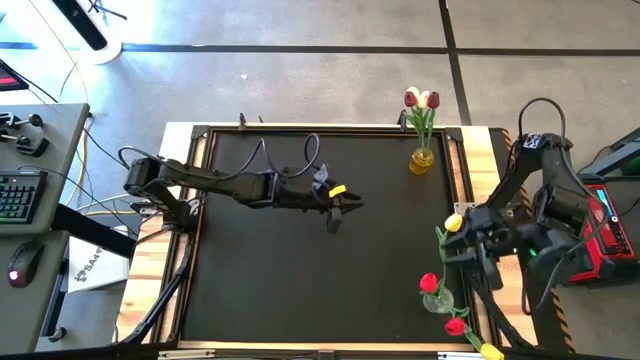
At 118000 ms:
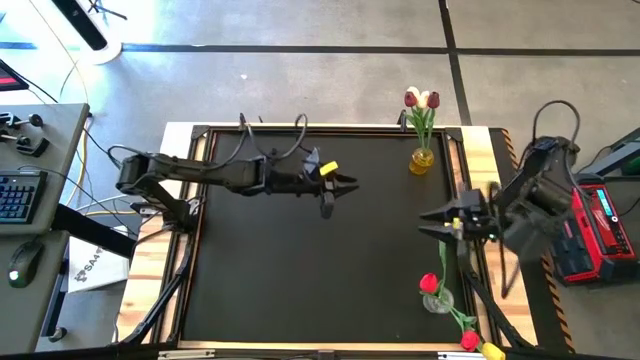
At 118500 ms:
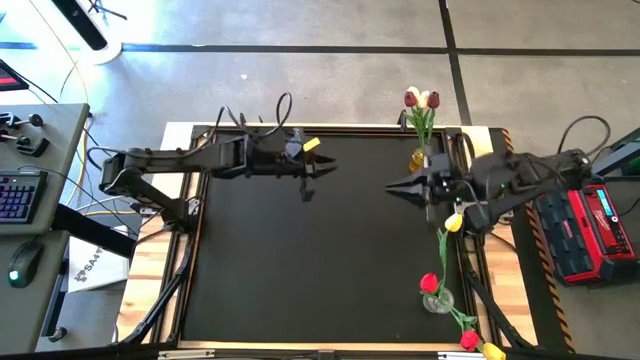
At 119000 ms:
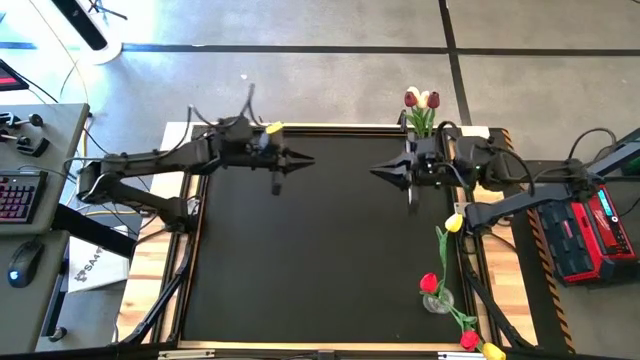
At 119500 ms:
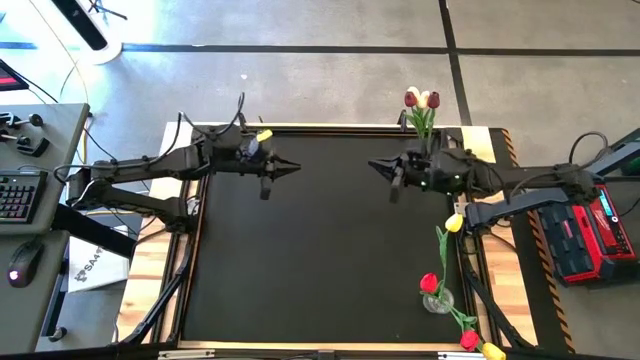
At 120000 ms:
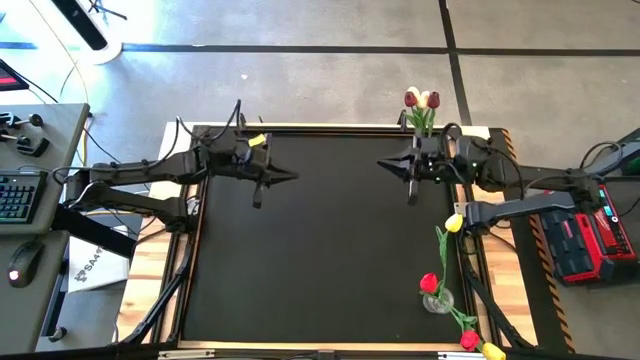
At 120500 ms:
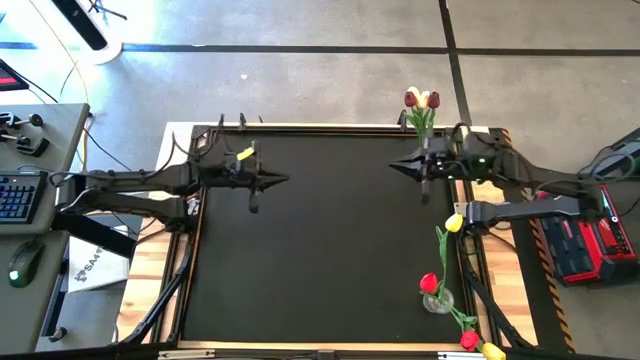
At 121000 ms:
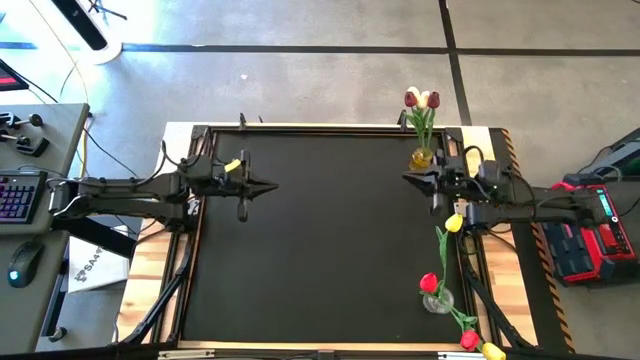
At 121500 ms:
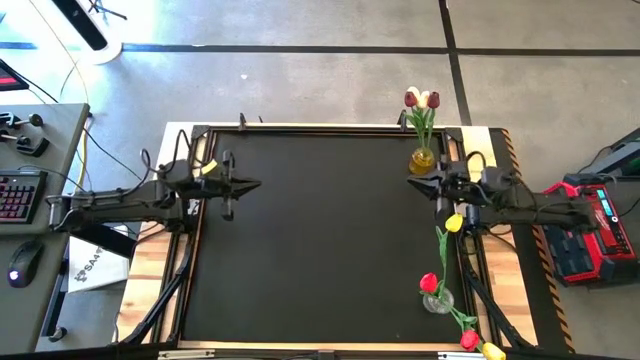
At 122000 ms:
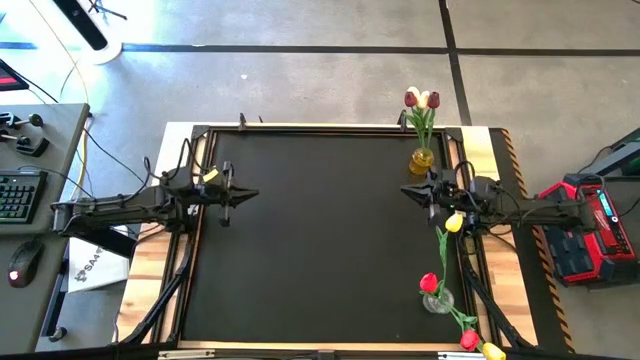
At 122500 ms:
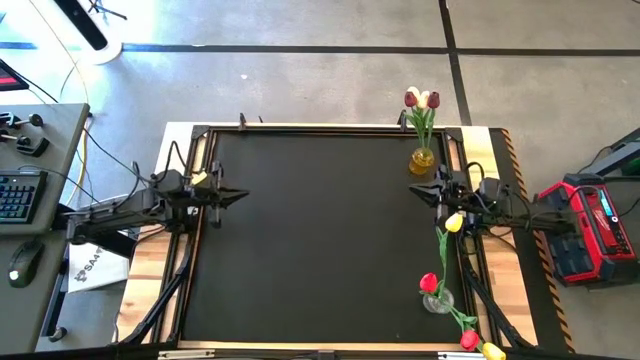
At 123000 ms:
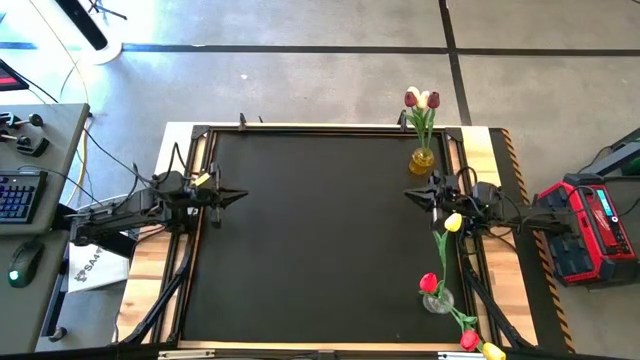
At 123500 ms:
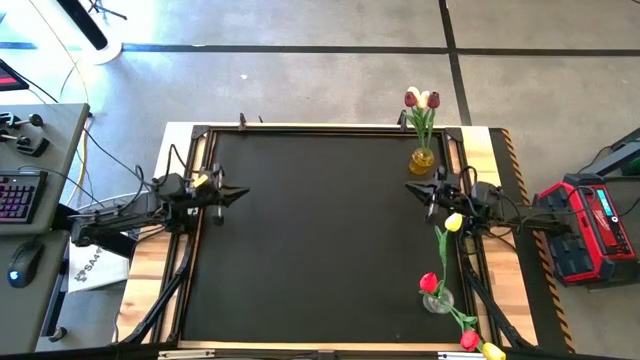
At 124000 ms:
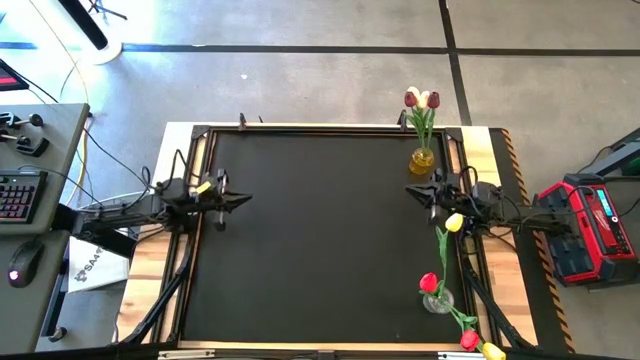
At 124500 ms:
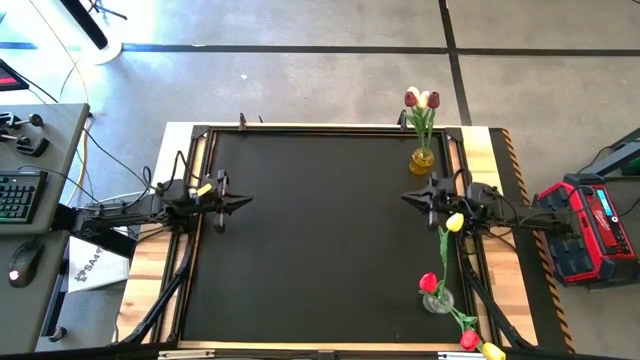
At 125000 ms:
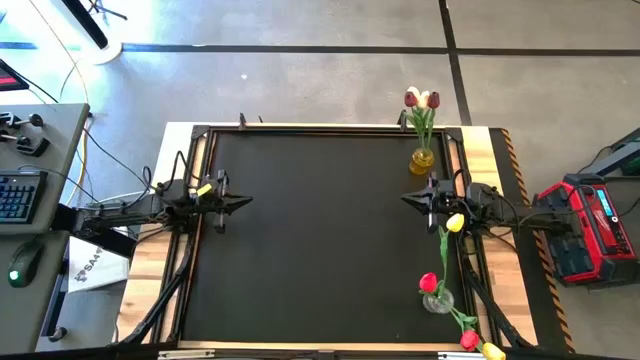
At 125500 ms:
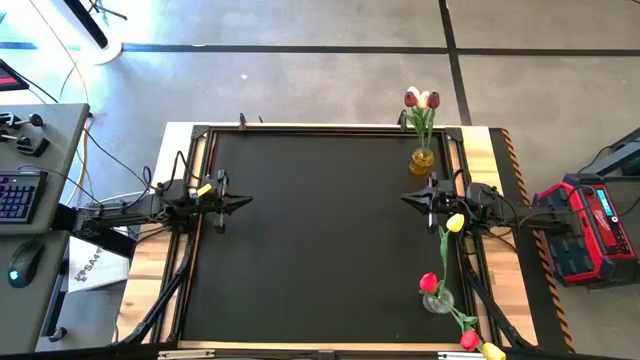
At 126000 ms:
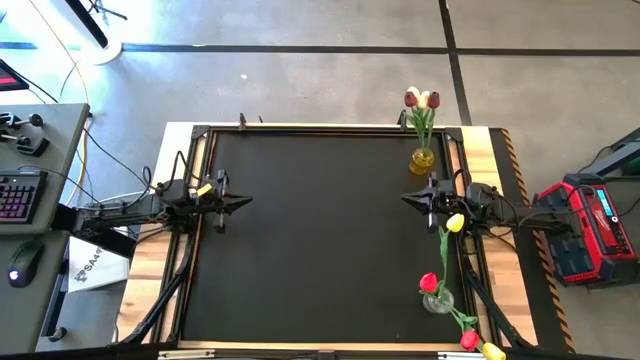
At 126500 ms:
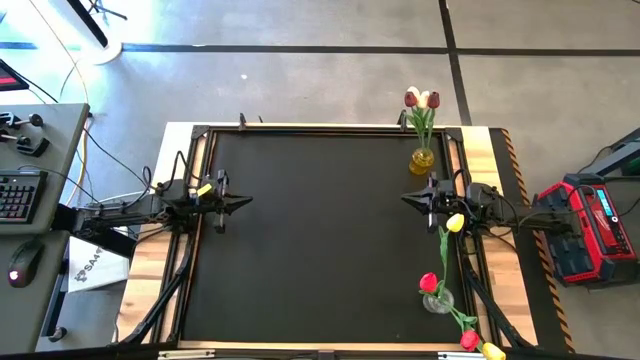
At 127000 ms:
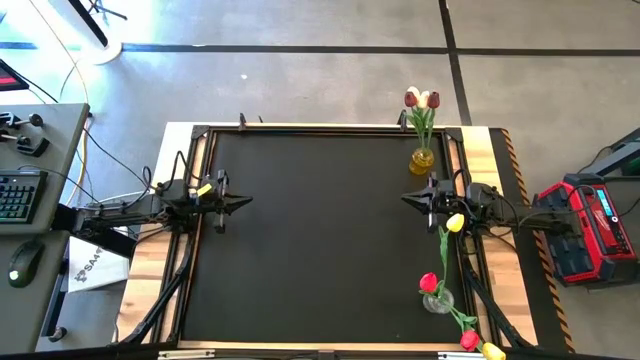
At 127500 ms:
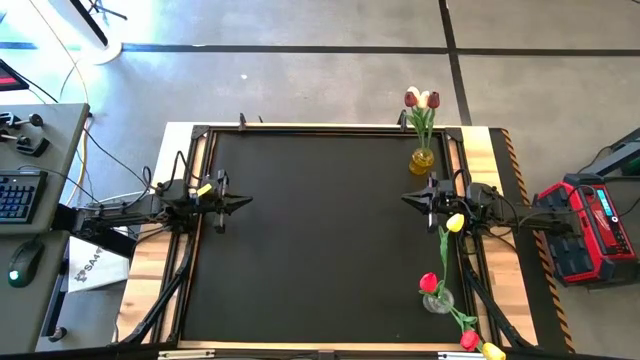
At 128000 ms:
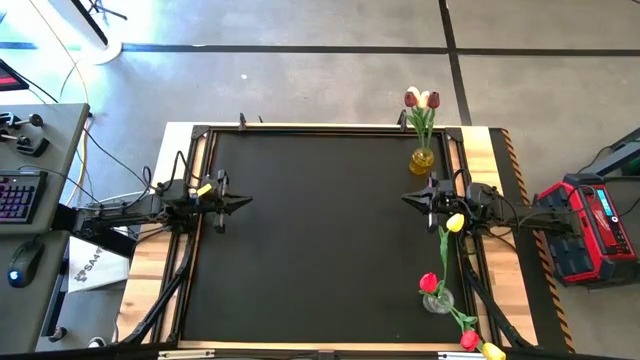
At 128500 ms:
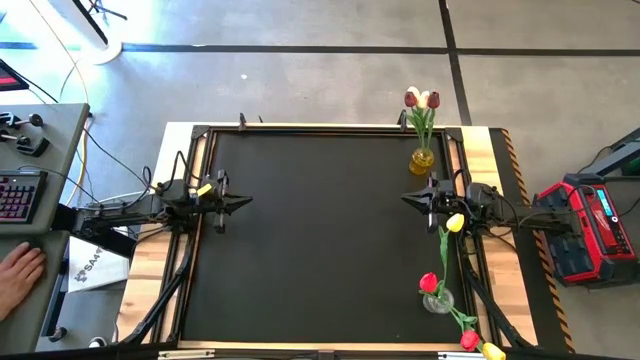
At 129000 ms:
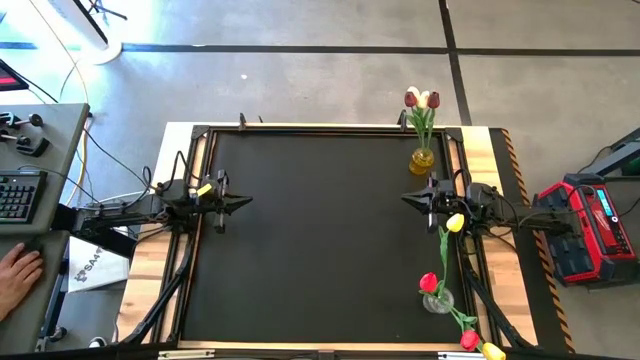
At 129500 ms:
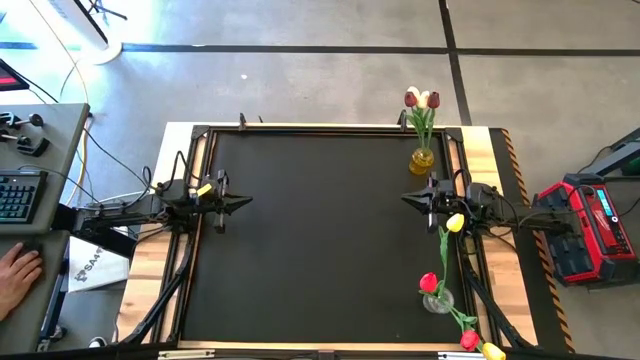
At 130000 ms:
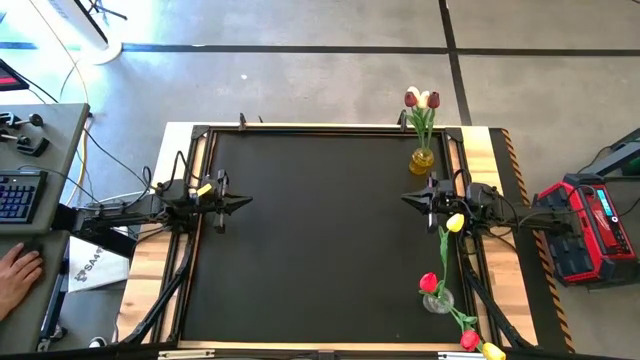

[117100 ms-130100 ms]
Task: Sort flowers into vase by color
Return to Home Position

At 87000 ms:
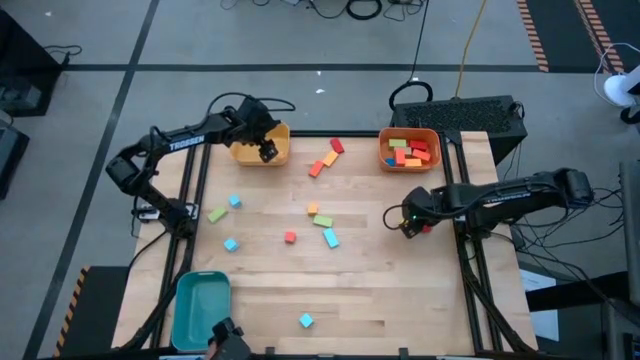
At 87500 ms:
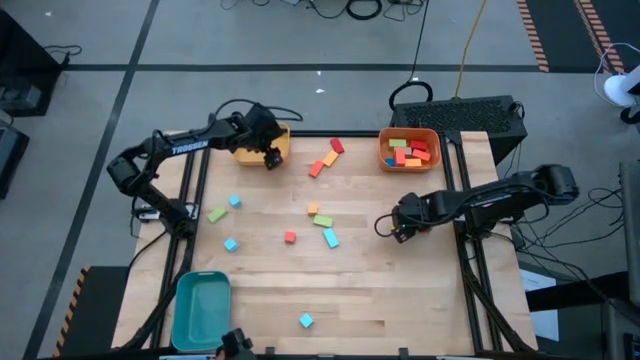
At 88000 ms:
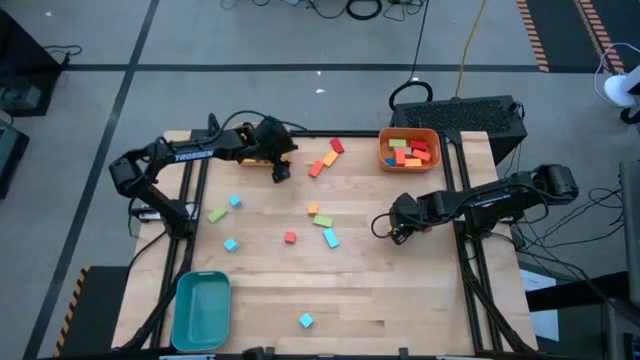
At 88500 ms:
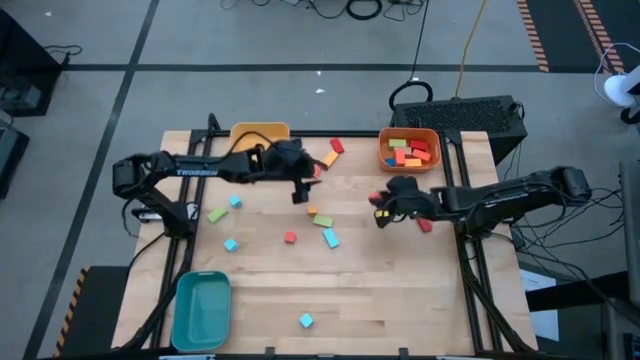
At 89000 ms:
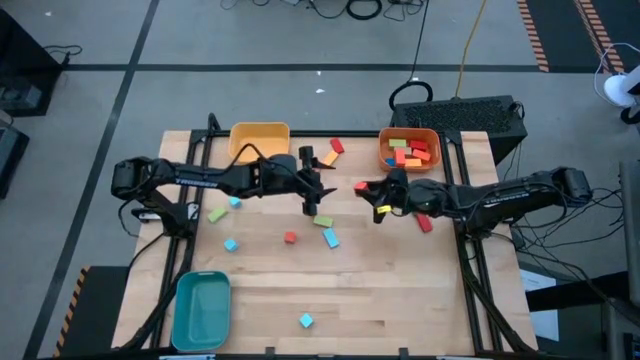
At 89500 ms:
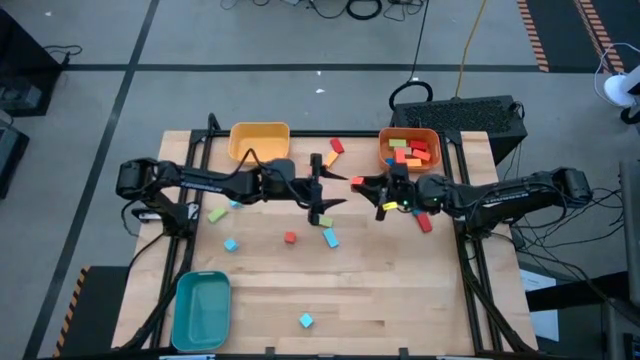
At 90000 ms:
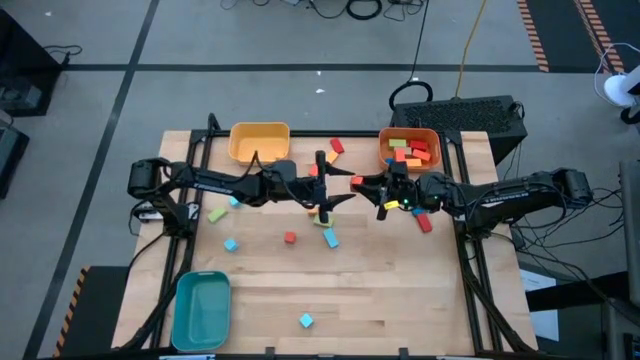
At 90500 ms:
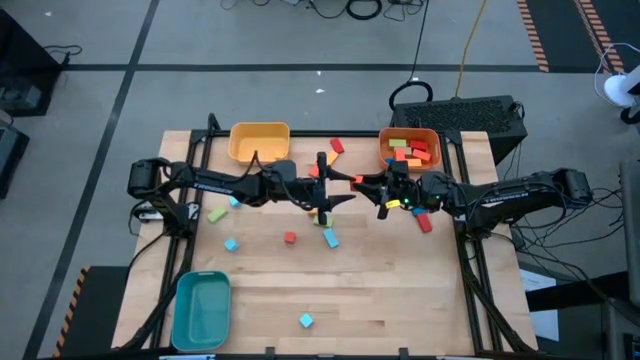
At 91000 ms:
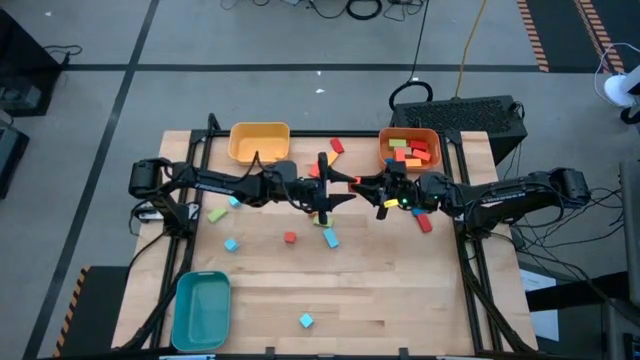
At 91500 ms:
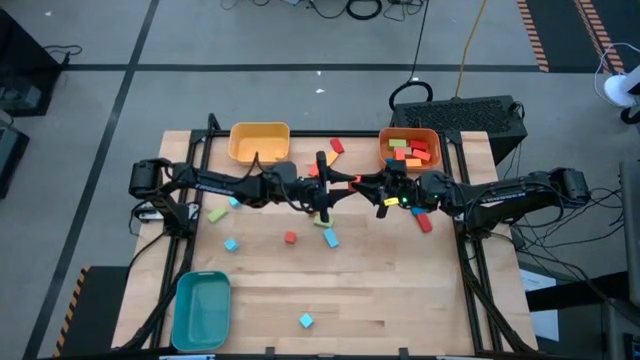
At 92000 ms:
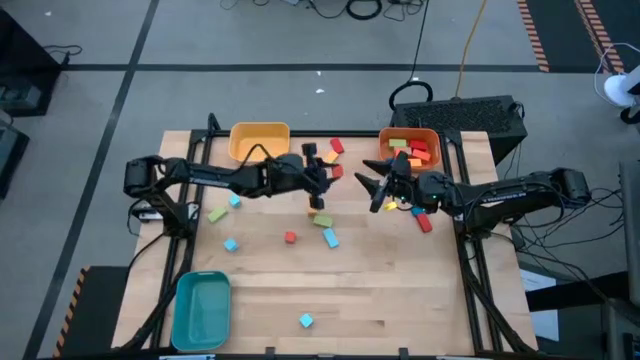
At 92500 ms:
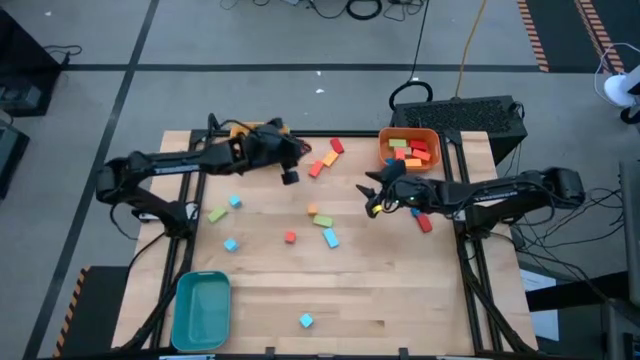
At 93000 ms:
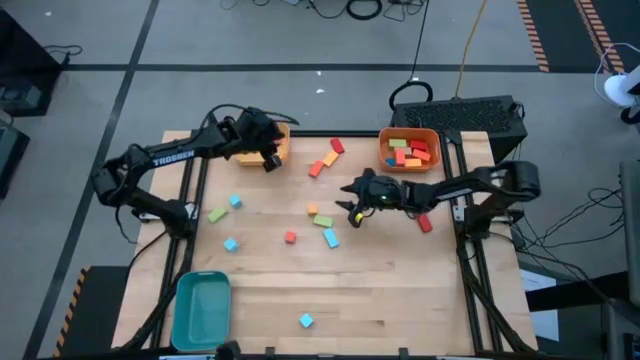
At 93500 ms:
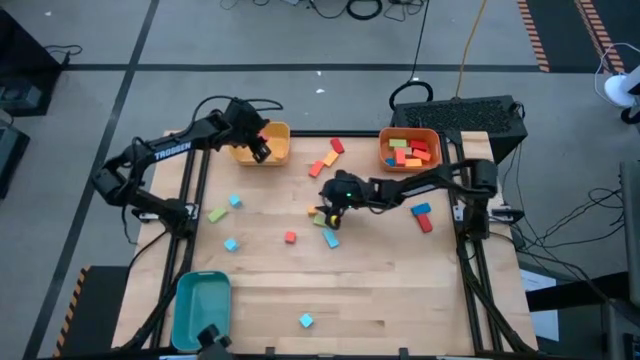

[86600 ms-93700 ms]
Task: Sort blocks by size
Put the orange block into the yellow bin
